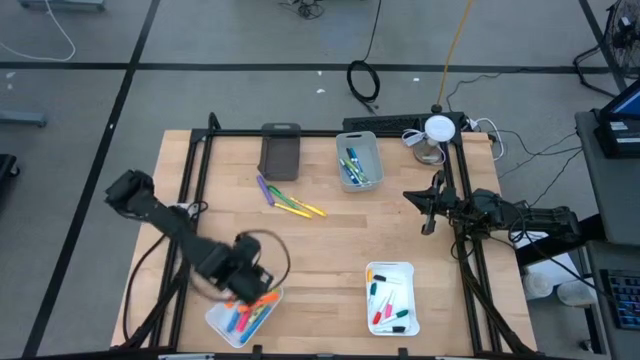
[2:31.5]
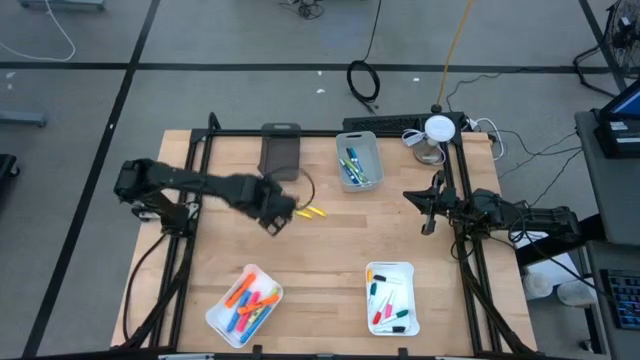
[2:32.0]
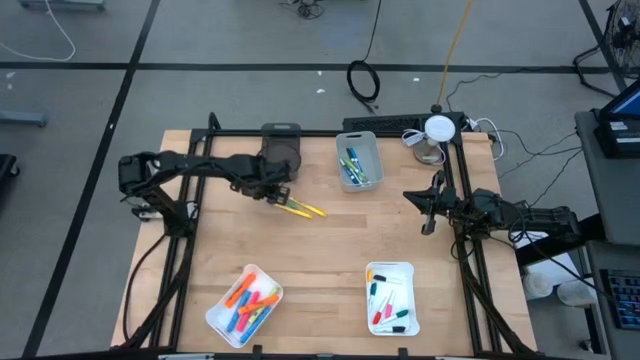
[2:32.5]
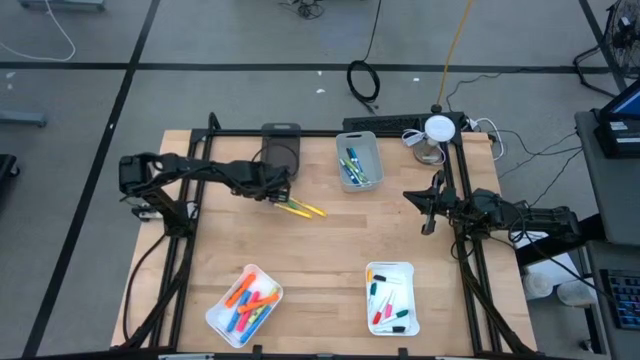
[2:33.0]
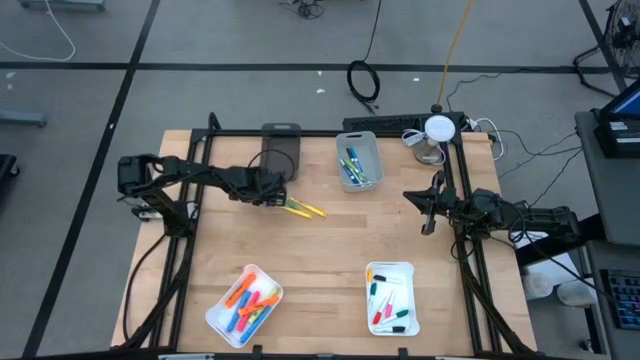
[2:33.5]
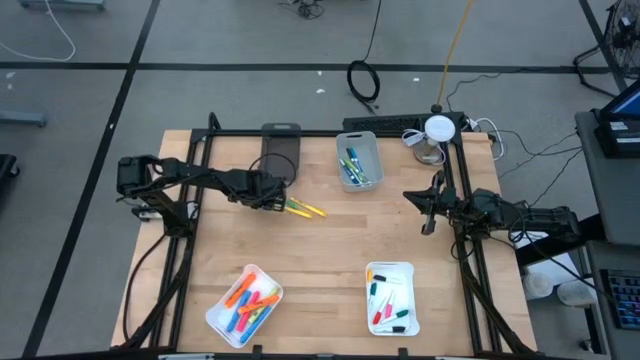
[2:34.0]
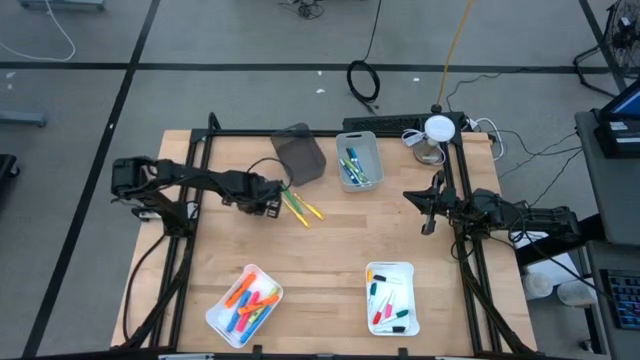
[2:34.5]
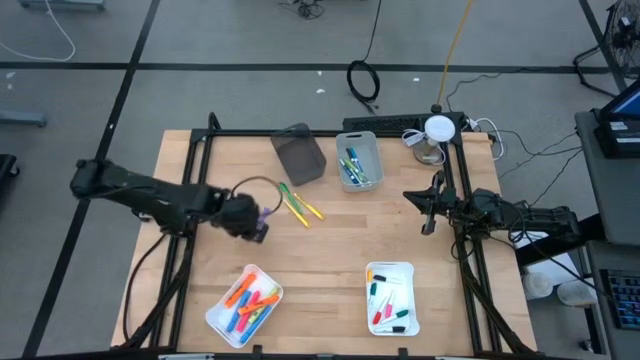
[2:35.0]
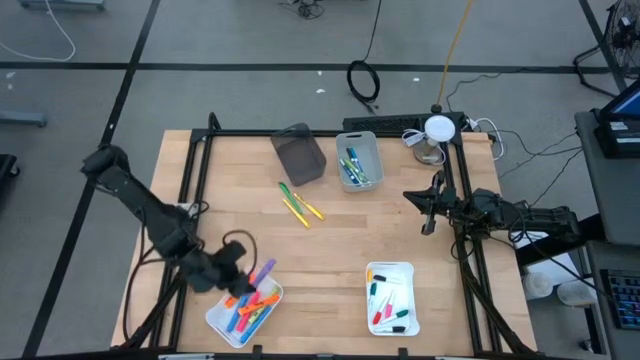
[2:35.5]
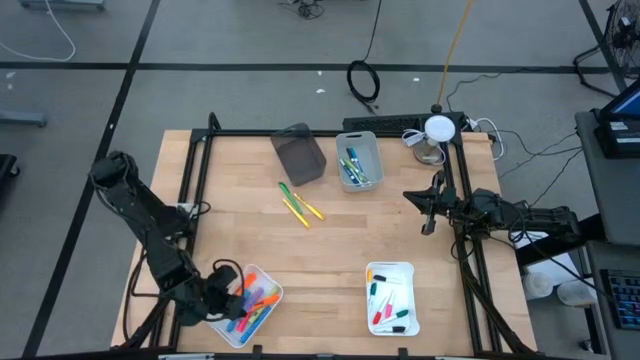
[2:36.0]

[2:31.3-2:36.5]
Task: Pick & Place Markers
Put the purple marker pen into the left white bin

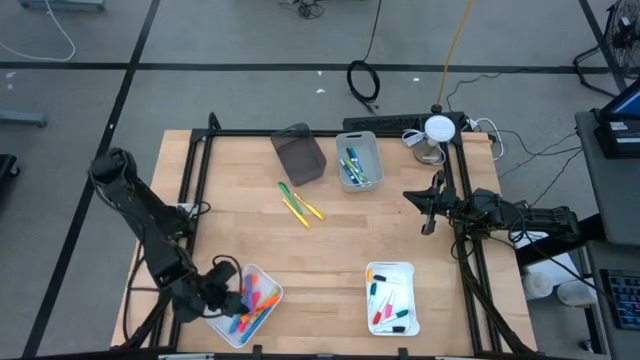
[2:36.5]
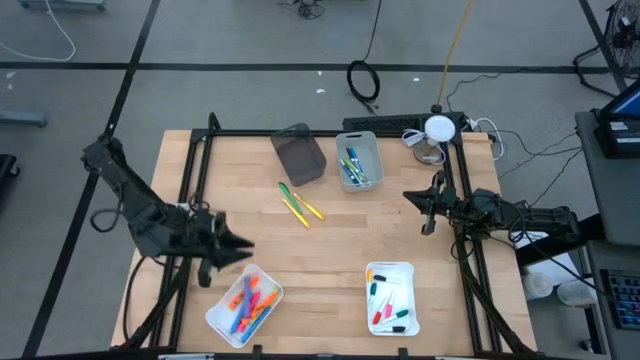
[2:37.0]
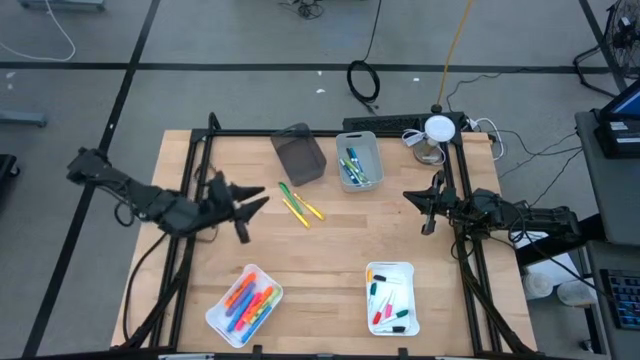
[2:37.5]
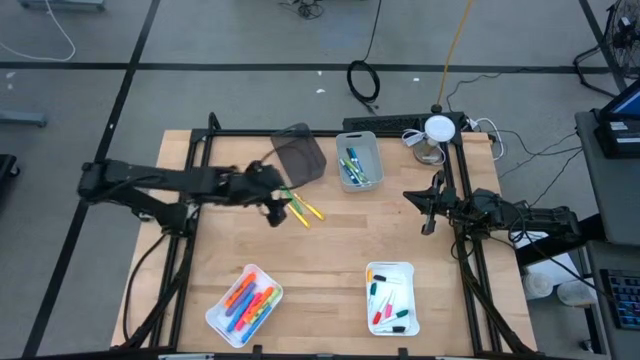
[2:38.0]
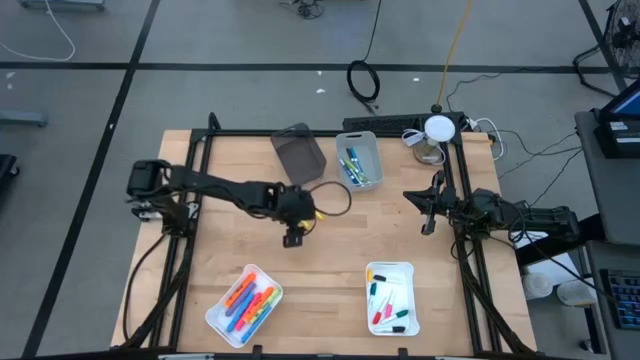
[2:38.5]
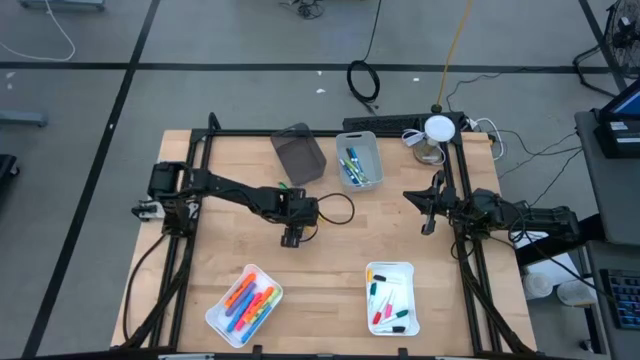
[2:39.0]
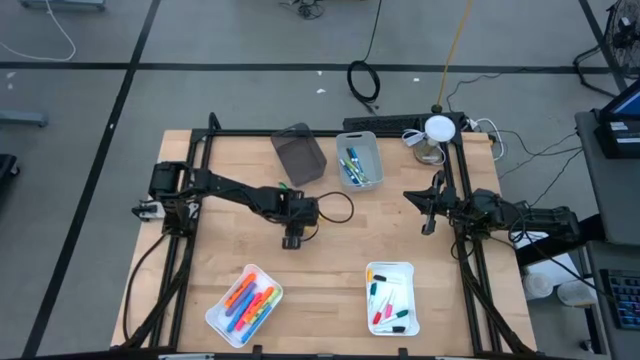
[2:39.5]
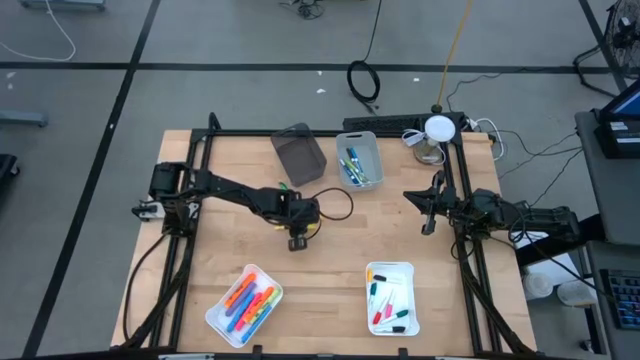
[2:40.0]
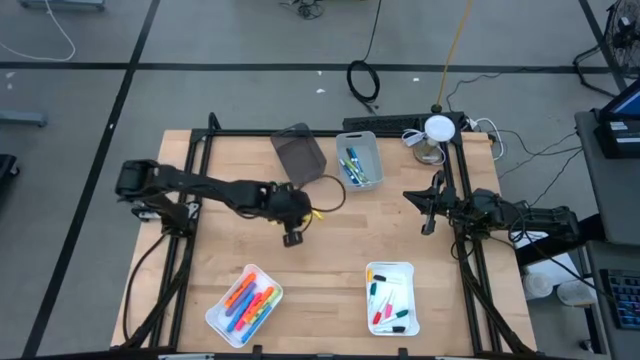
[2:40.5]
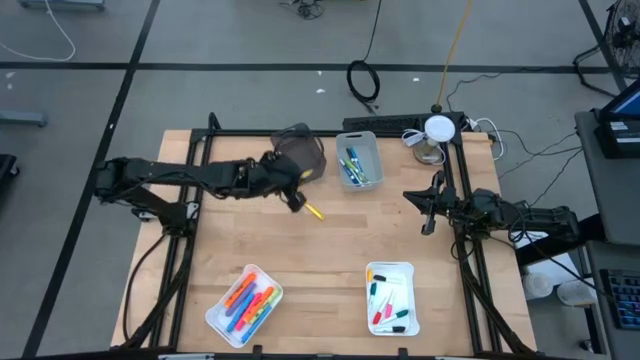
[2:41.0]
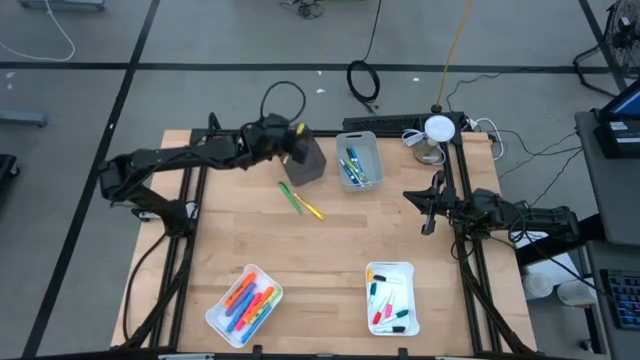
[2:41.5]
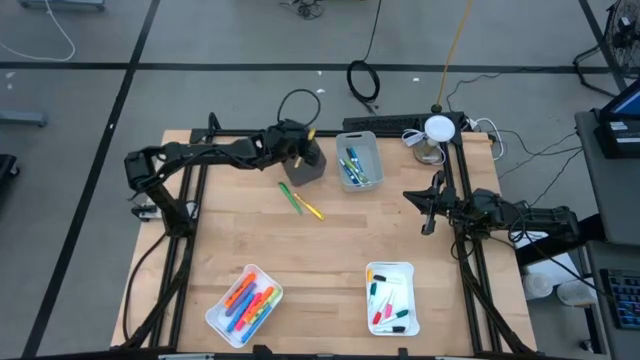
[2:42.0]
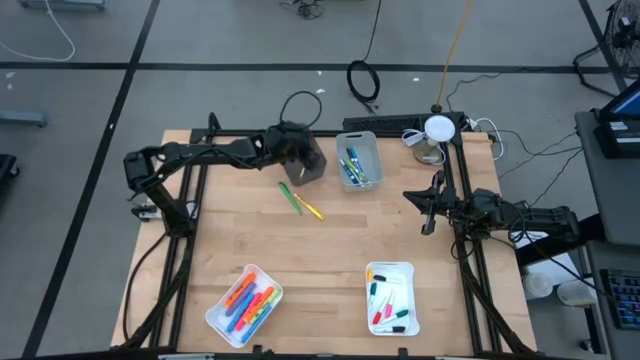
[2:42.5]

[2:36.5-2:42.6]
Put the left yellow pen into the black bin

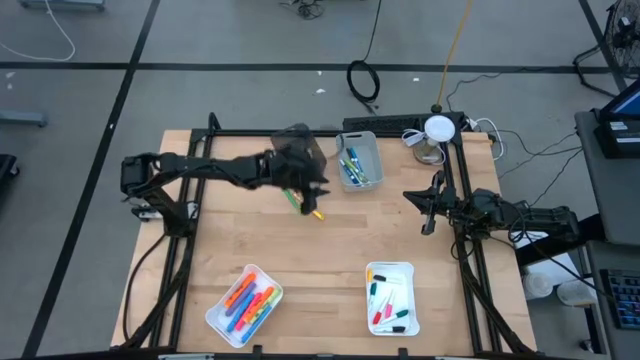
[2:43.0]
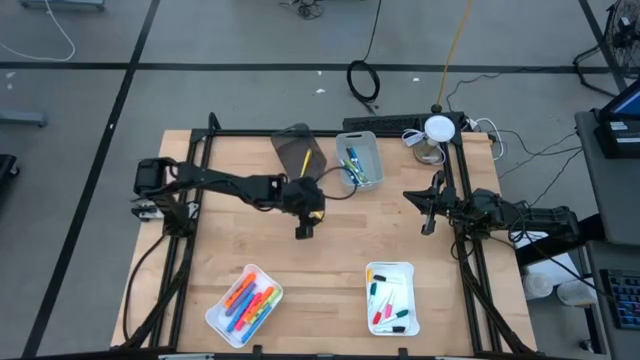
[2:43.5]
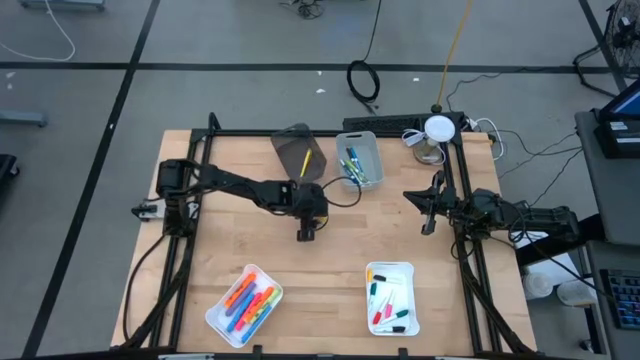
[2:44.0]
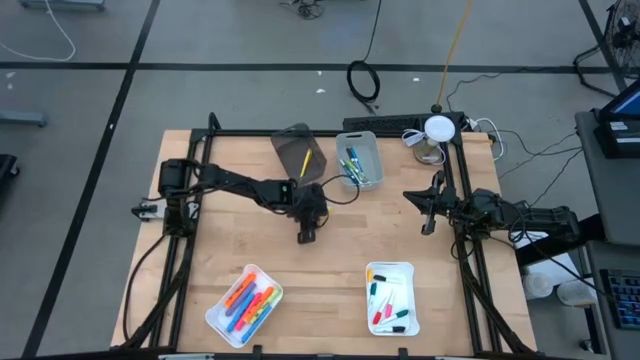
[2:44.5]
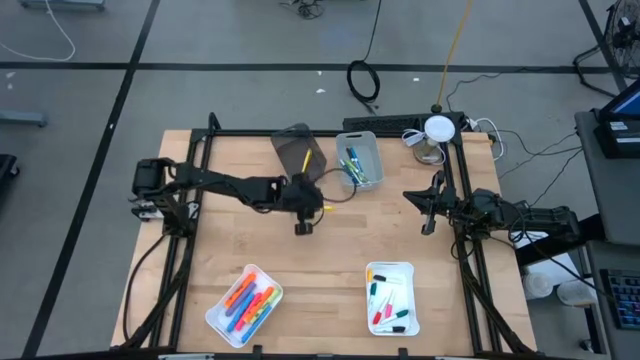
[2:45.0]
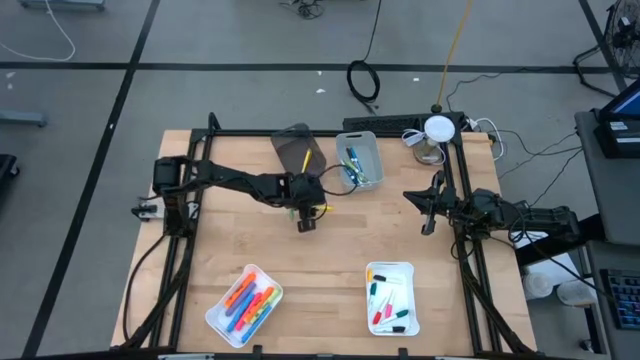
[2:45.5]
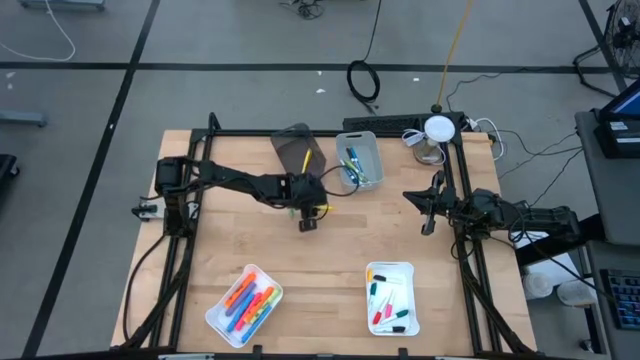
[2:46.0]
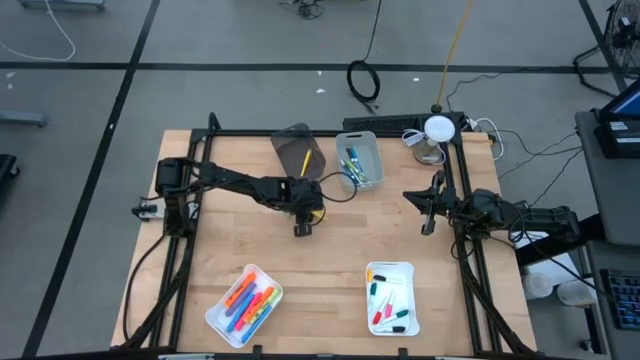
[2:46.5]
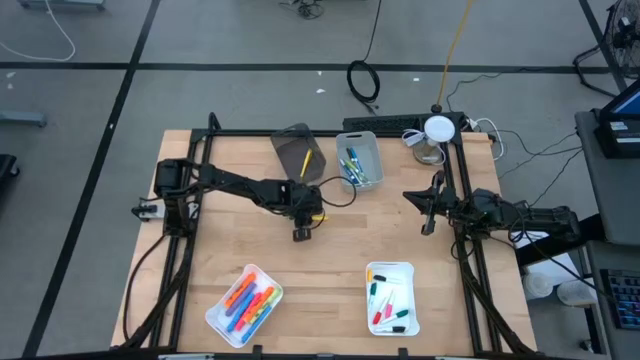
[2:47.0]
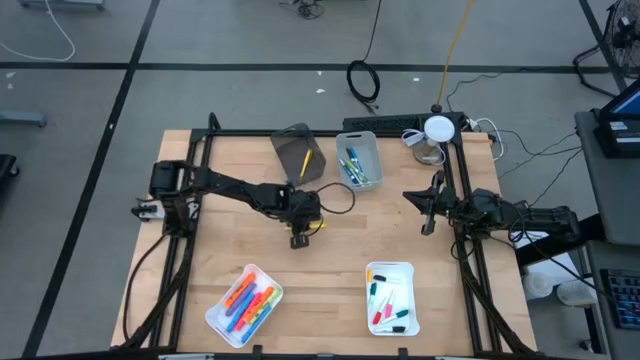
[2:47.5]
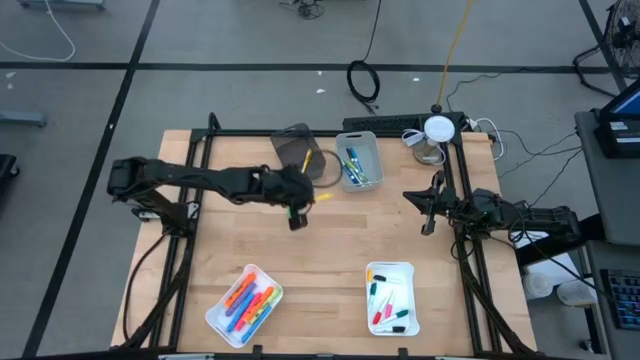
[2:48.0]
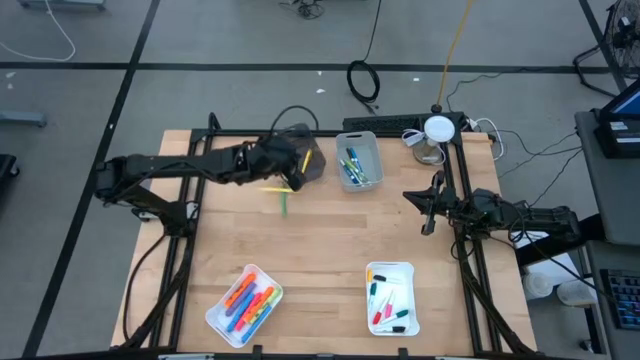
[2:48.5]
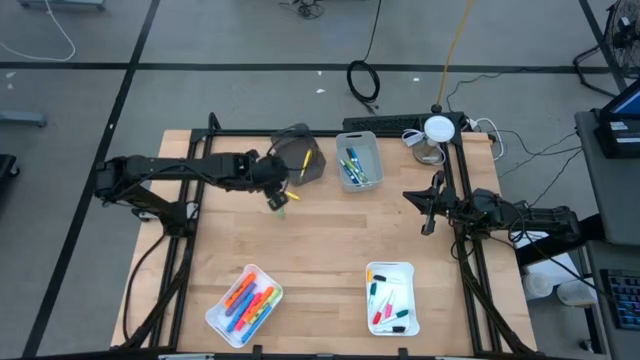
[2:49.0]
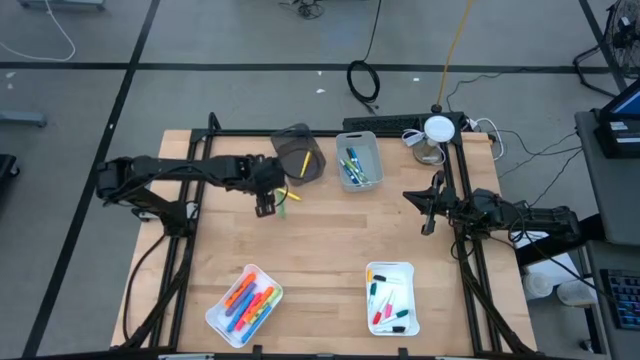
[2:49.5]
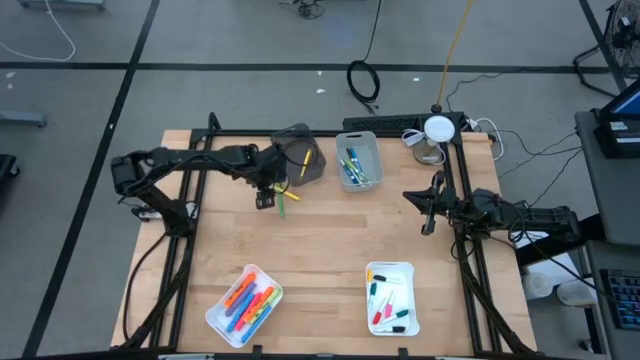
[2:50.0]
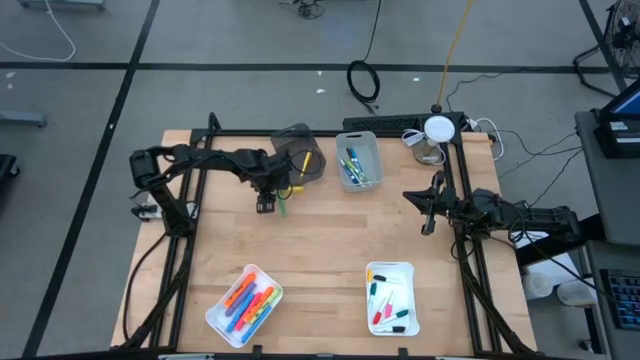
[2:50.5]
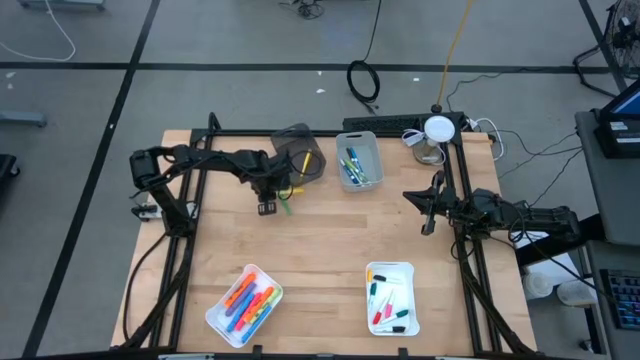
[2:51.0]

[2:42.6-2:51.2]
Put the yellow pen into the black bin

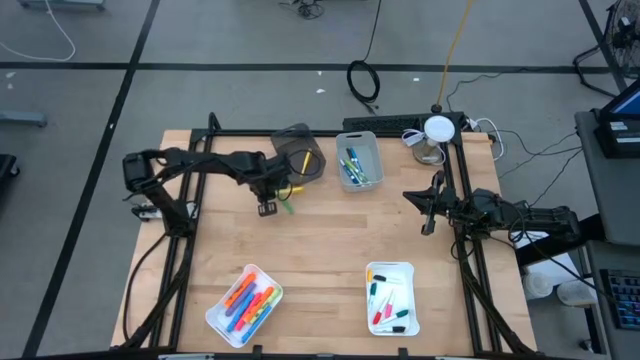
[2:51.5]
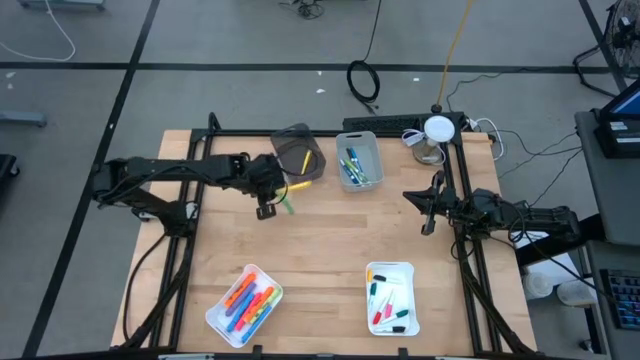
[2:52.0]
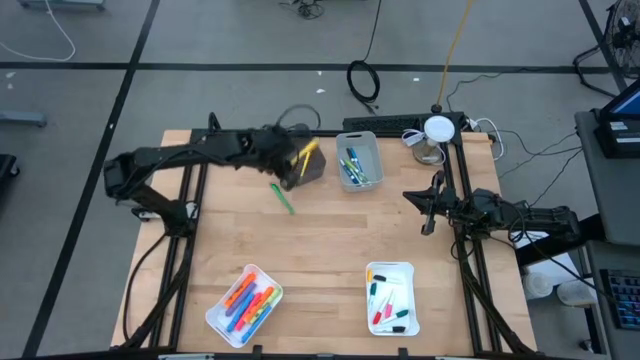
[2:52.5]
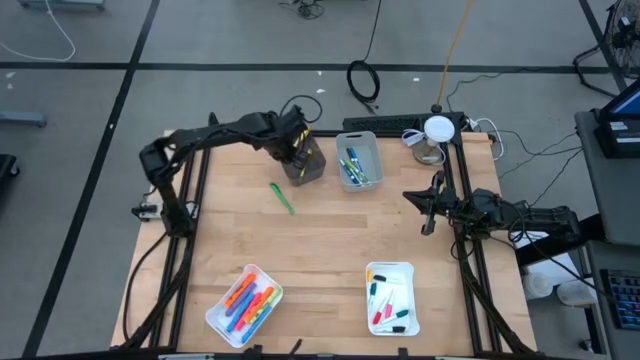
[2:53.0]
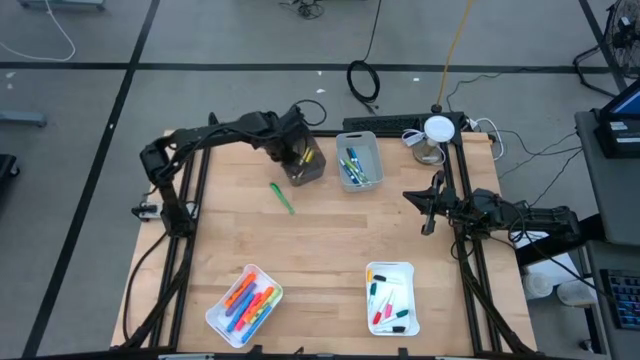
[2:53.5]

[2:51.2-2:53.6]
Put the yellow pen into the black bin
